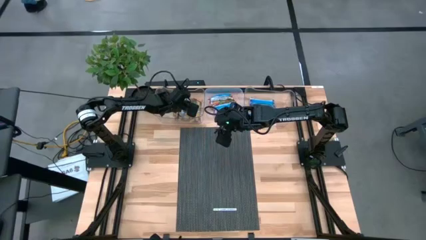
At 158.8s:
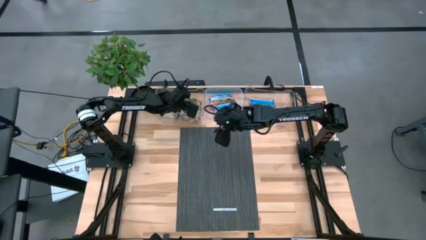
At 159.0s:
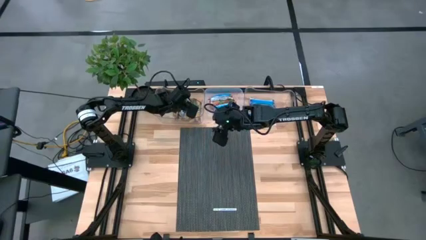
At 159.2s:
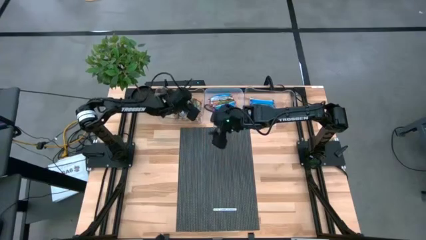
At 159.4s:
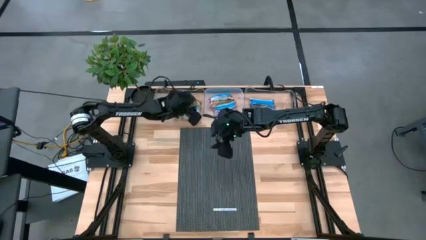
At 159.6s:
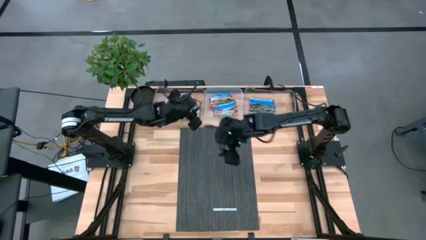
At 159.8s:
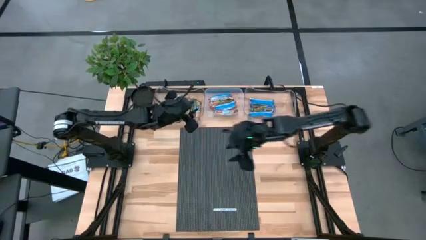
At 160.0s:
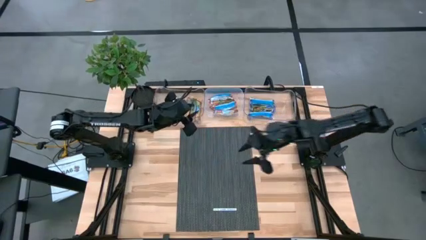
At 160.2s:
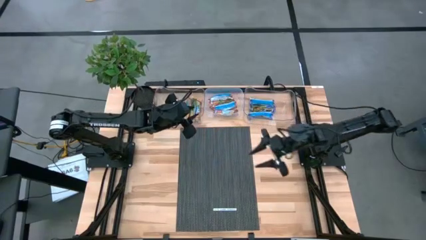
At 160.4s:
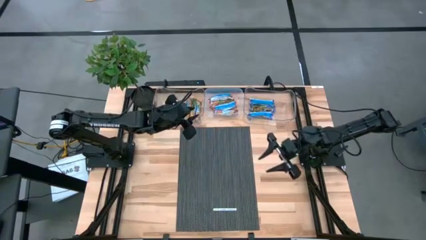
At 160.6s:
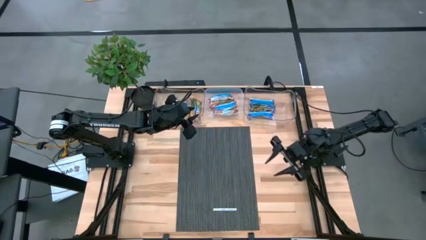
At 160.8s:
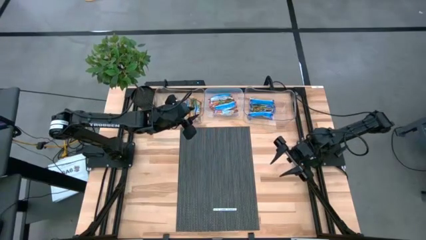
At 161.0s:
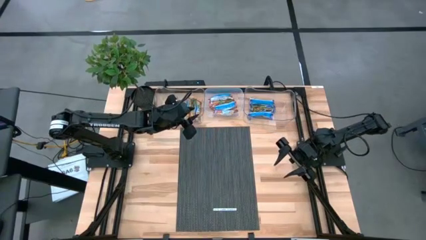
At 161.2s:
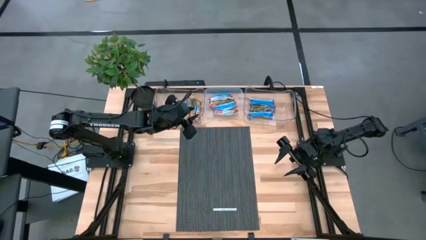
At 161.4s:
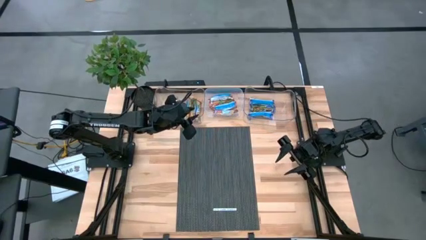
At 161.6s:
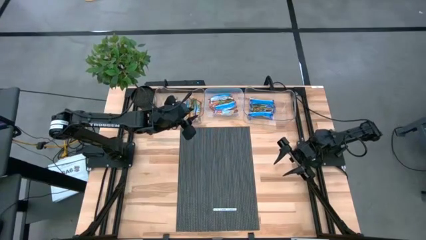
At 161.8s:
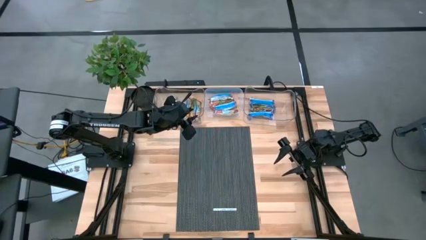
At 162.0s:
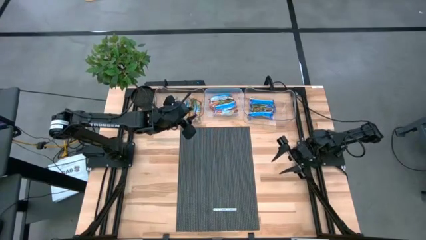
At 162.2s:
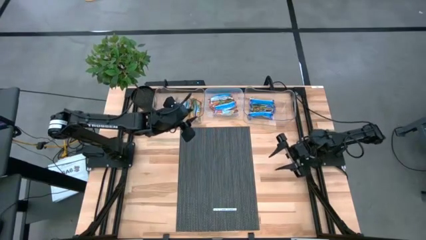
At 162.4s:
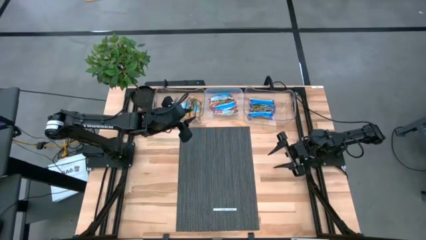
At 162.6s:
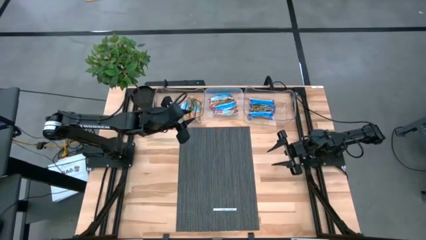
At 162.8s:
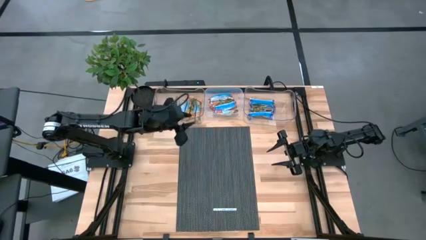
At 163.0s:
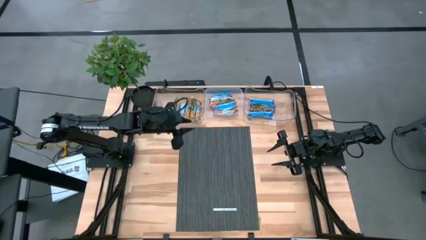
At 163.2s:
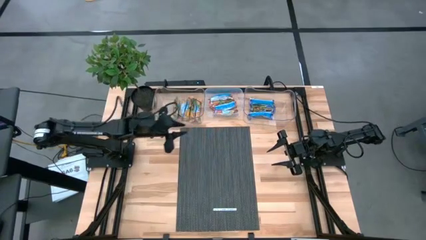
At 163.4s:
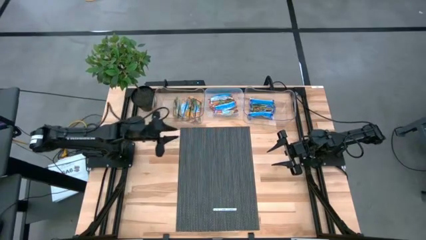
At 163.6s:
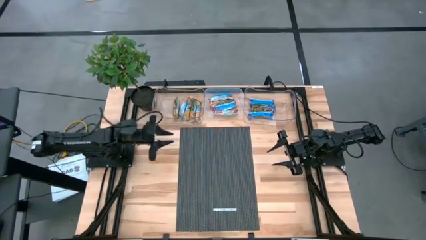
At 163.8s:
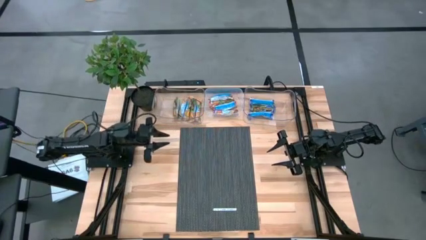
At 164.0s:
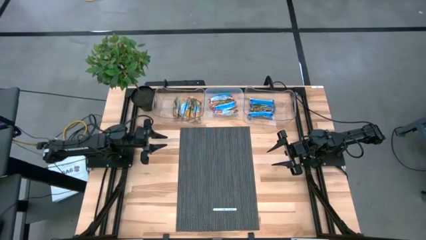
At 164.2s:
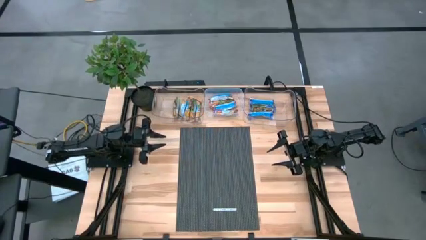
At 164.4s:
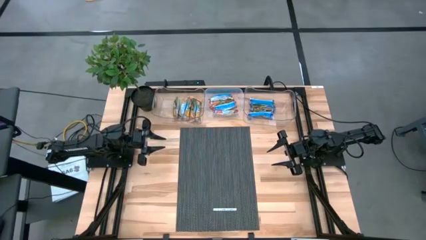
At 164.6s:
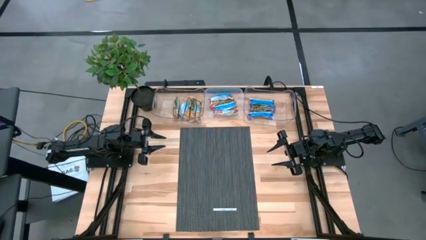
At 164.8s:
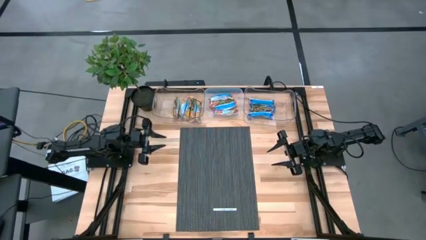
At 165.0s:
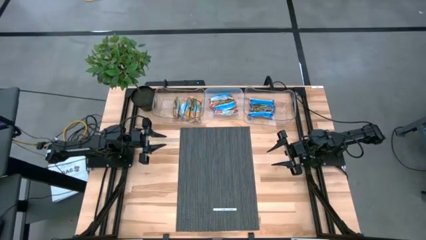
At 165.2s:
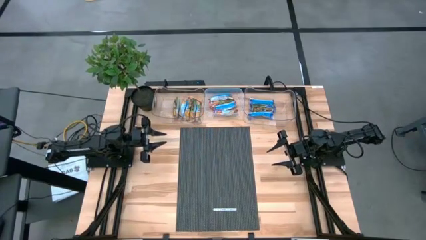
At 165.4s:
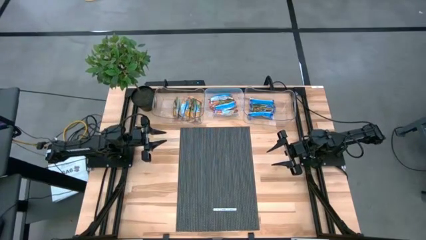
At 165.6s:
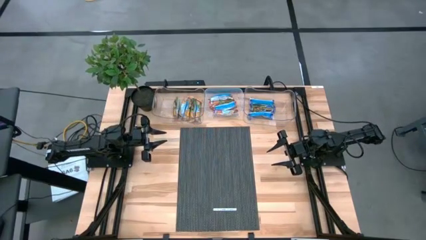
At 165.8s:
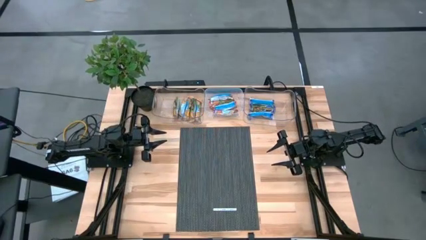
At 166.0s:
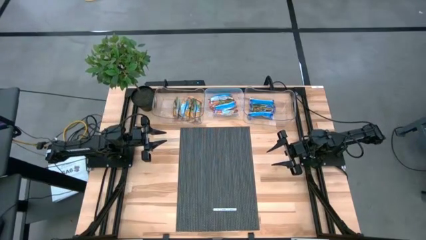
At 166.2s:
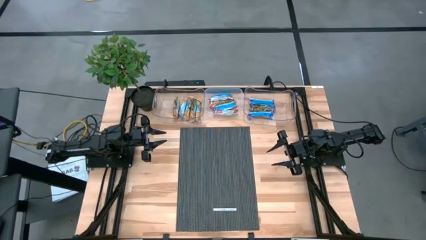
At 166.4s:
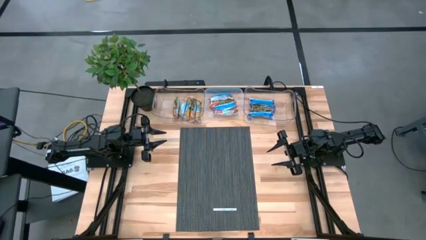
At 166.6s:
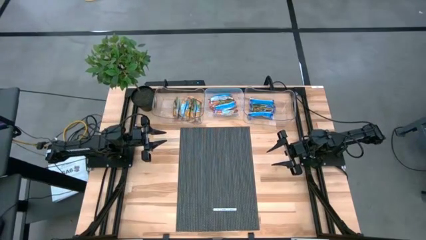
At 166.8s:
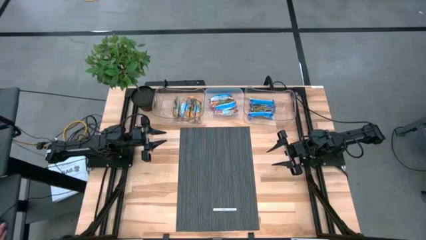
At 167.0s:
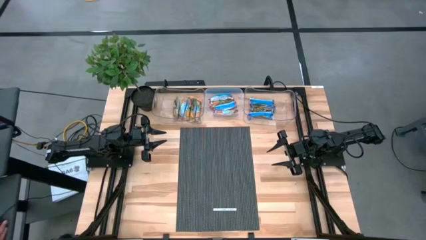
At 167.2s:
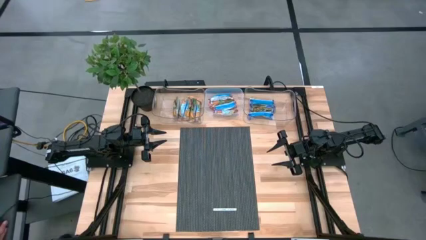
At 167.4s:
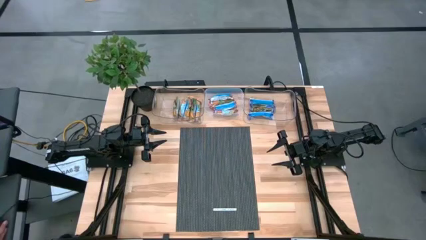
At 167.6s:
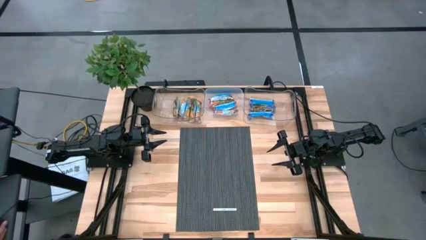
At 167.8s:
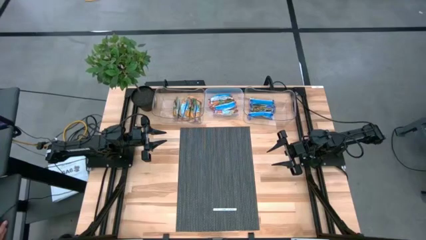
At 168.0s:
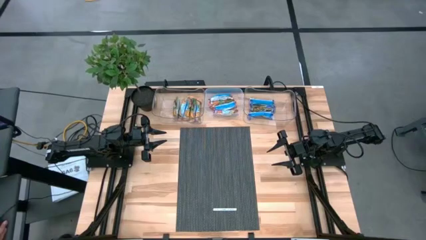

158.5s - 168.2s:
Task: Pick and place Granola Bars by type
Return to Home Position

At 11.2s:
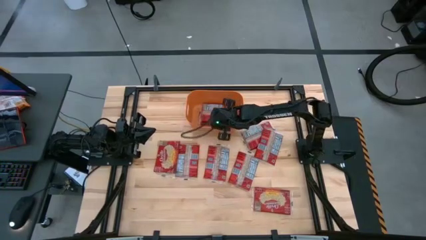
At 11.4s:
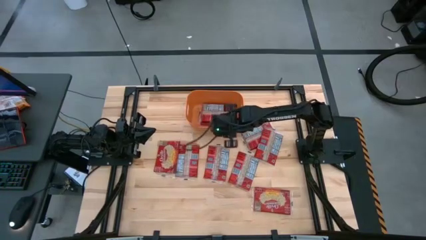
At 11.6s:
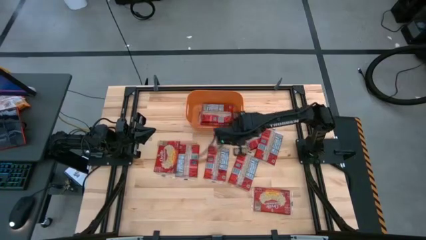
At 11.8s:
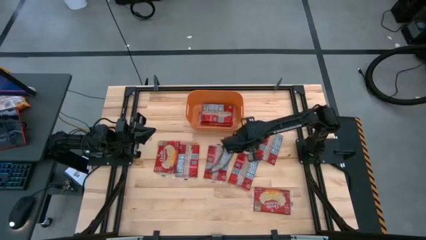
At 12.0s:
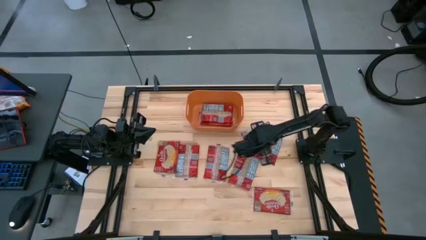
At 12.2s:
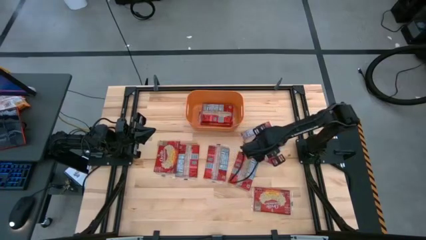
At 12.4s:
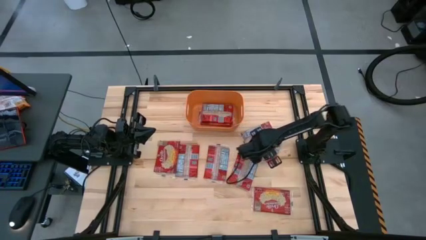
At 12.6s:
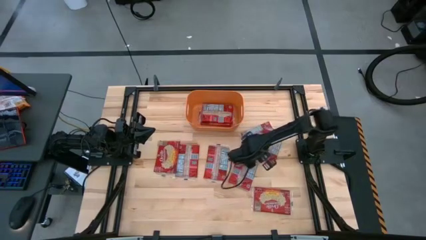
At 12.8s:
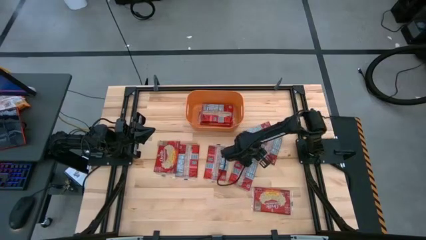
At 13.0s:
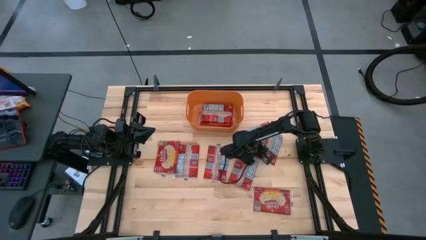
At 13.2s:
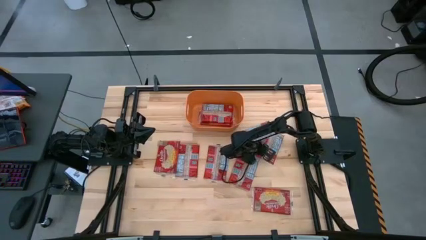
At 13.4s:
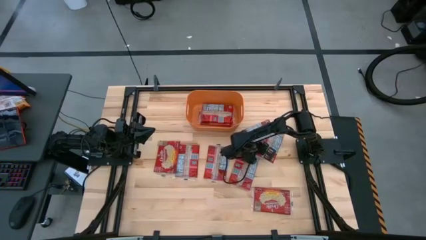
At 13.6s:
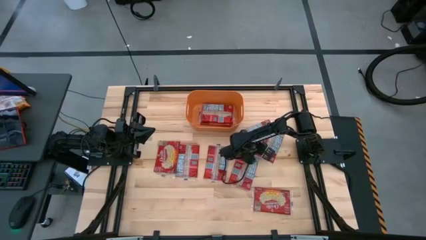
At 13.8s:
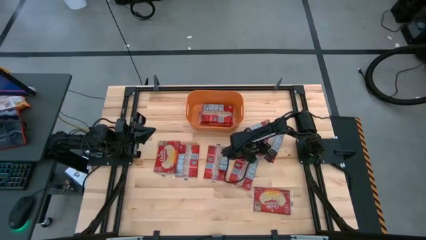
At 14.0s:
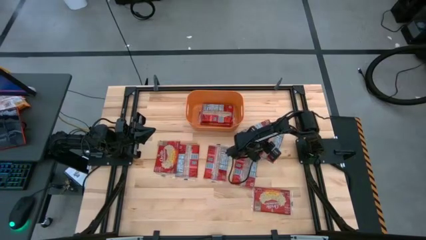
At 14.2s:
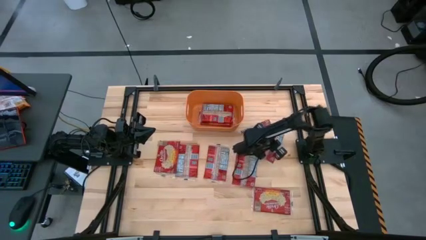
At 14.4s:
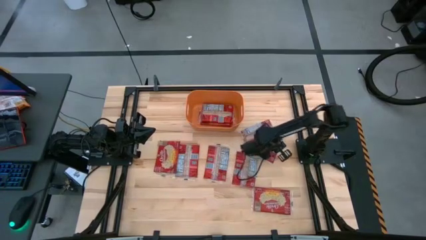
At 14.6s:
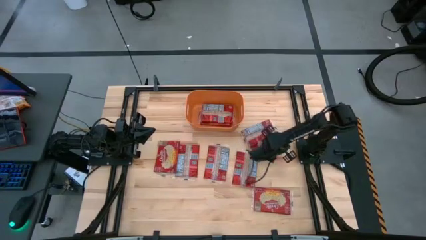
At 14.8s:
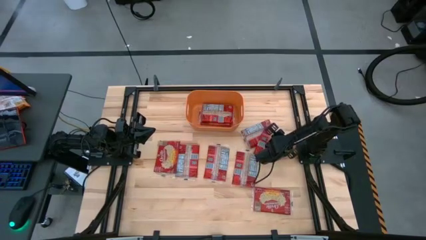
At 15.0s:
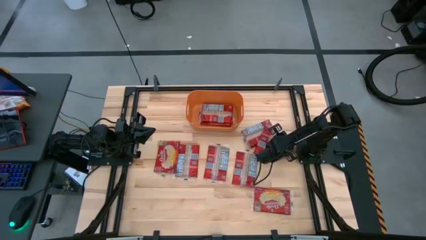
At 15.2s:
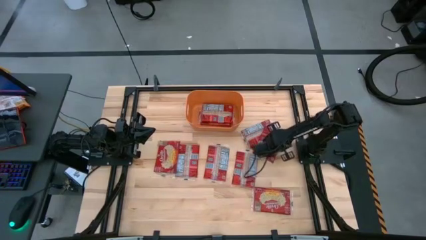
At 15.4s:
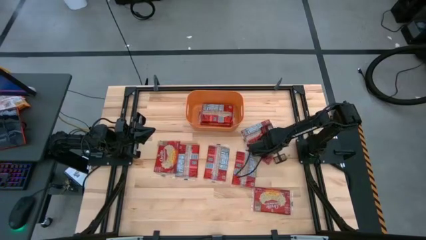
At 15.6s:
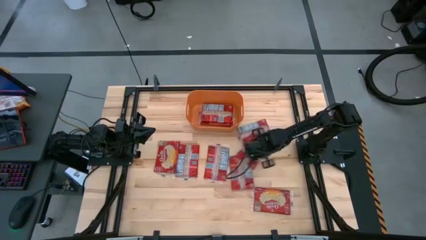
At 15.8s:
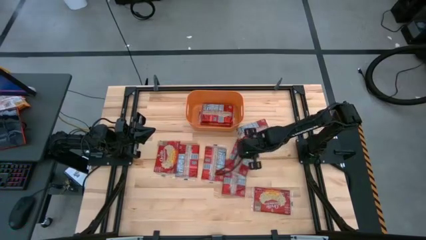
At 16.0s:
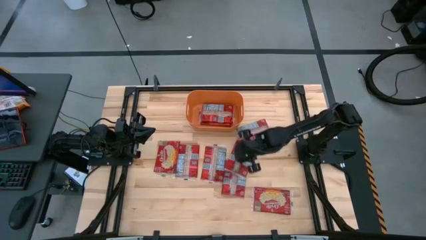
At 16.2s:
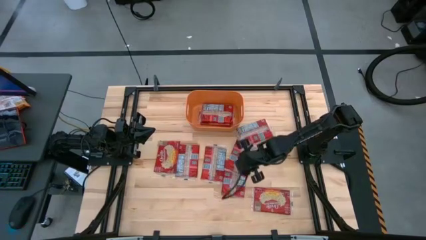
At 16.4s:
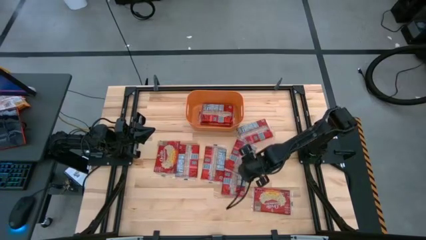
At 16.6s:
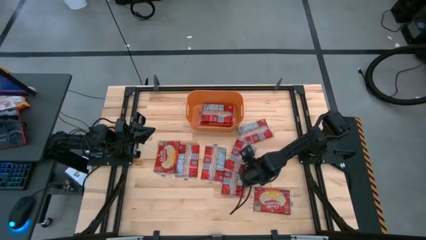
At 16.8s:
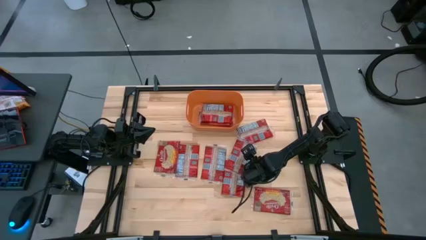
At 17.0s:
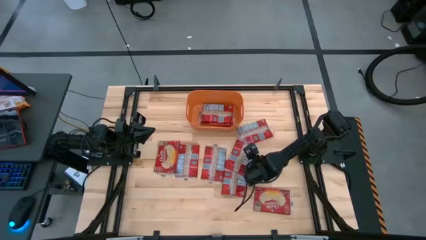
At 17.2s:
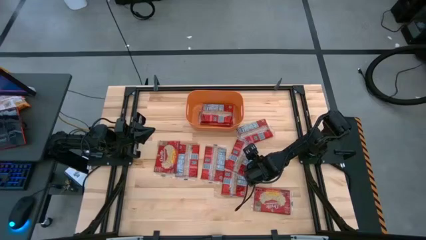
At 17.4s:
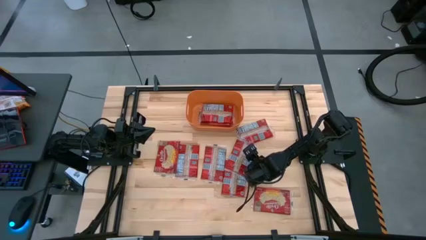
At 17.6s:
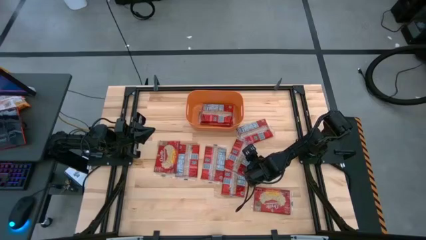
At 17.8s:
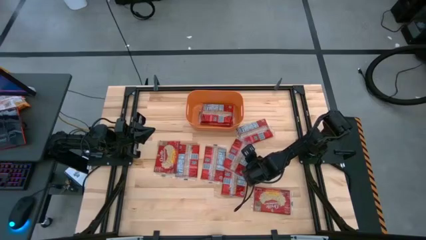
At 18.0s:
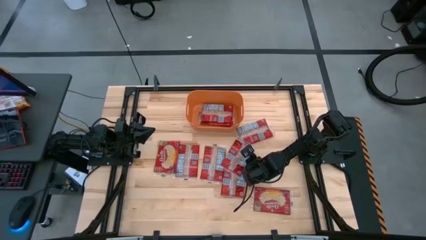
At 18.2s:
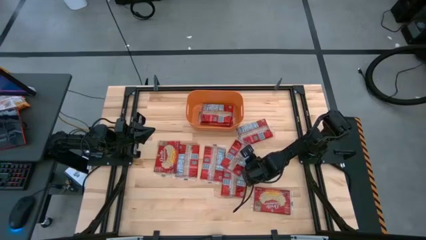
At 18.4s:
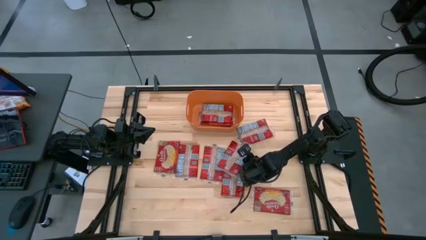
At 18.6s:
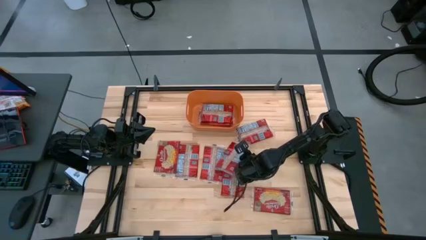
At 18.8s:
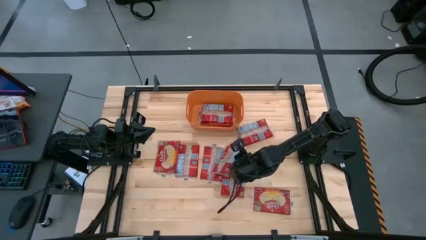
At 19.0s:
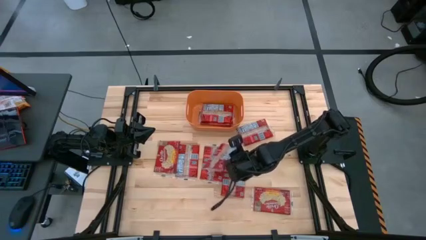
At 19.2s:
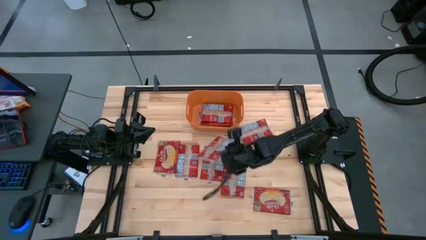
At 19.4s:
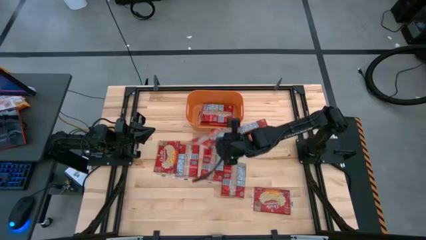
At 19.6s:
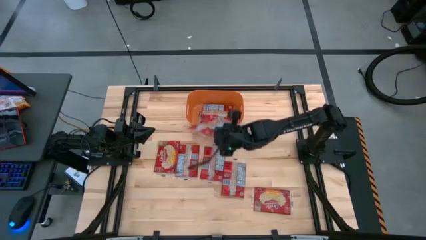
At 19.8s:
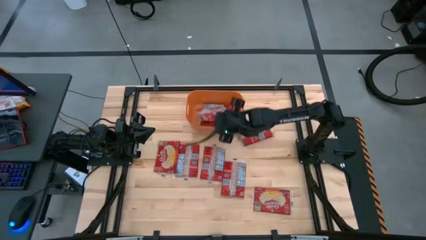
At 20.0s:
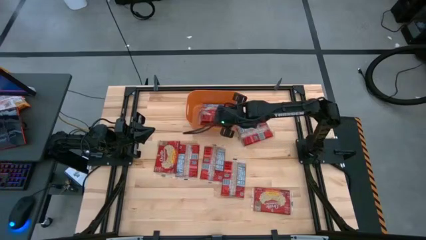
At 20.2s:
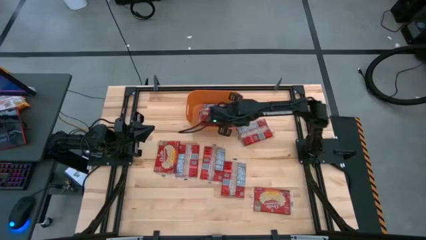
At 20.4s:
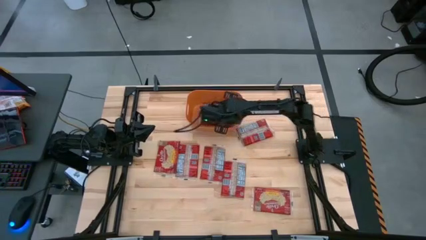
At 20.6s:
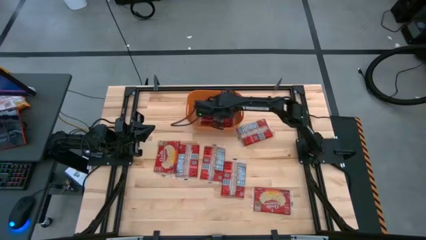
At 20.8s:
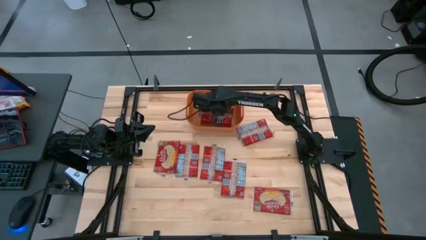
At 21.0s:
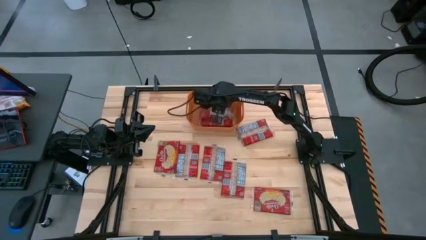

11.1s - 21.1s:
Task: Sort popcorn bags into baskets
Put the red popcorn bag into the orange bin
